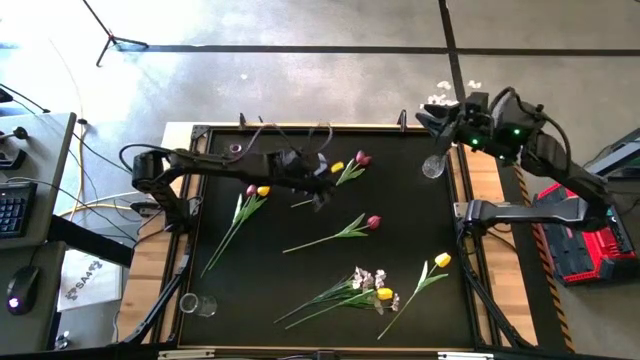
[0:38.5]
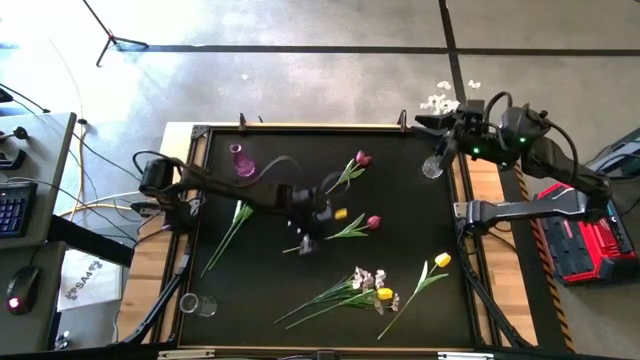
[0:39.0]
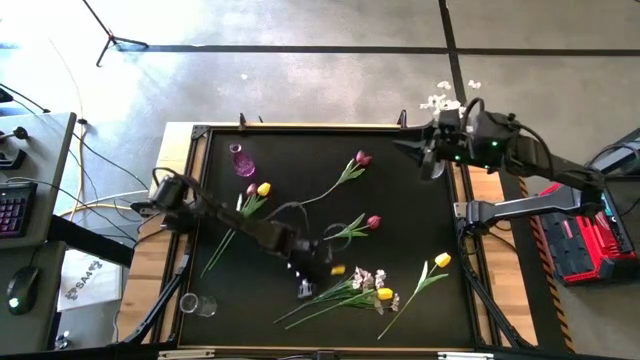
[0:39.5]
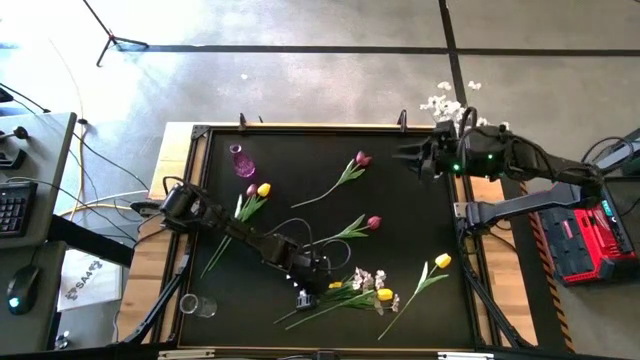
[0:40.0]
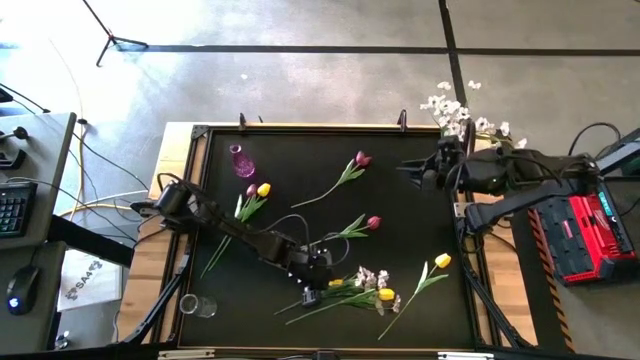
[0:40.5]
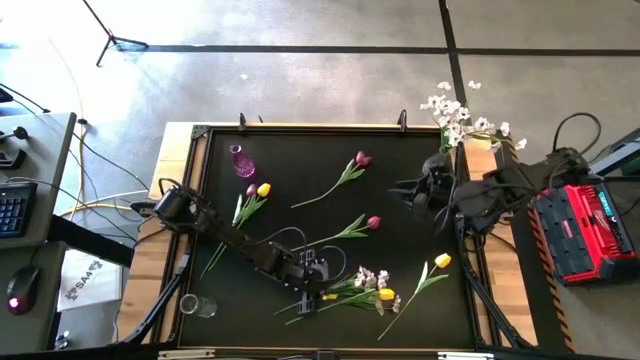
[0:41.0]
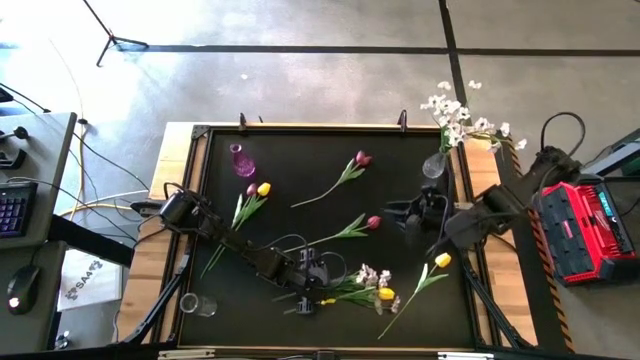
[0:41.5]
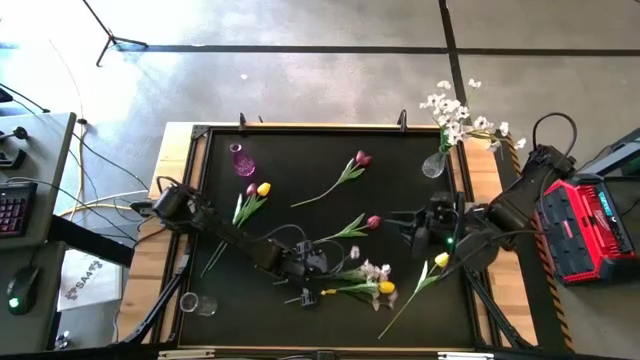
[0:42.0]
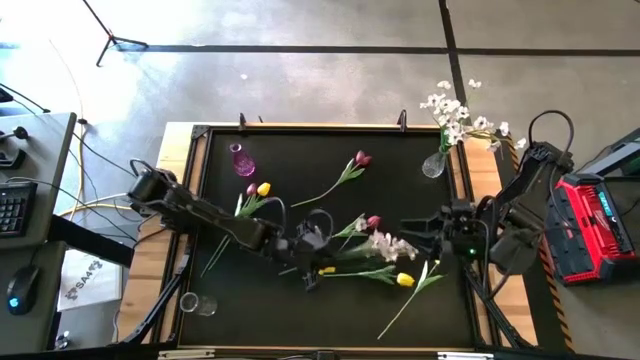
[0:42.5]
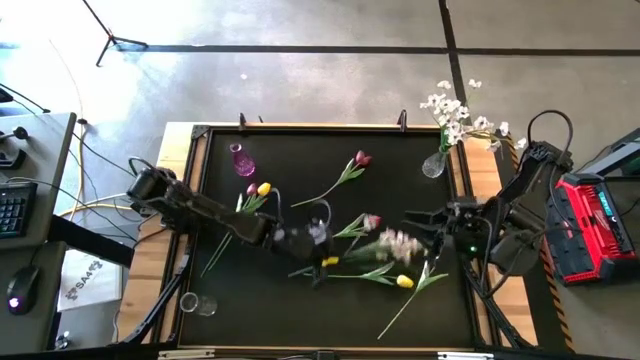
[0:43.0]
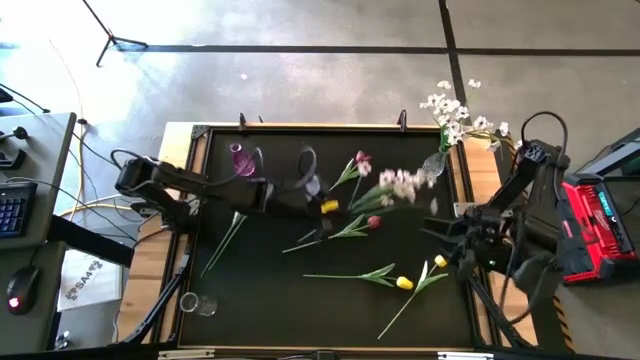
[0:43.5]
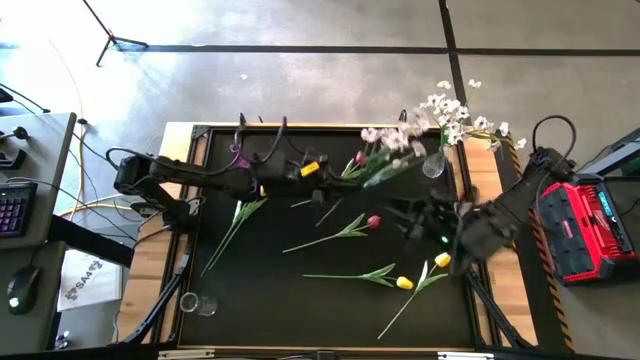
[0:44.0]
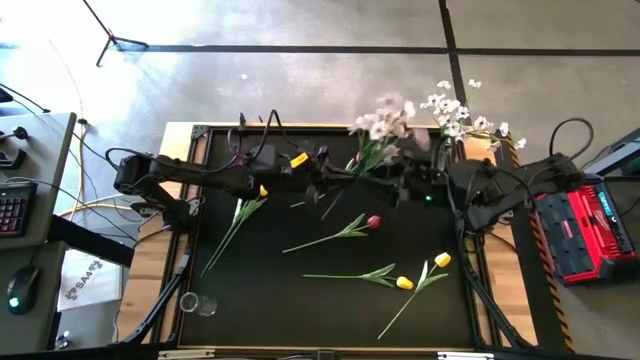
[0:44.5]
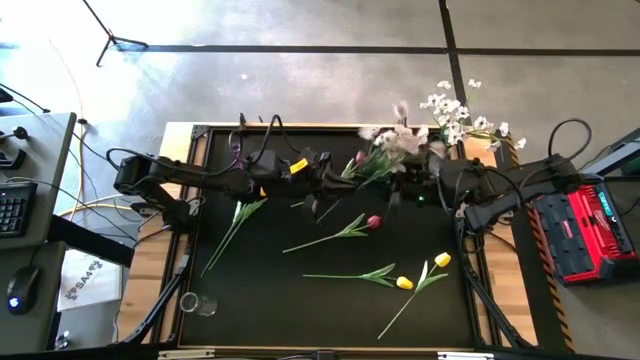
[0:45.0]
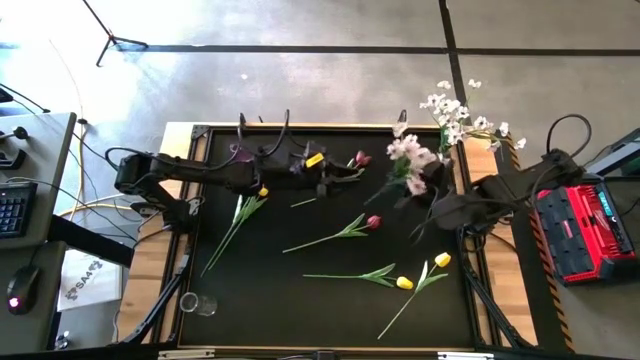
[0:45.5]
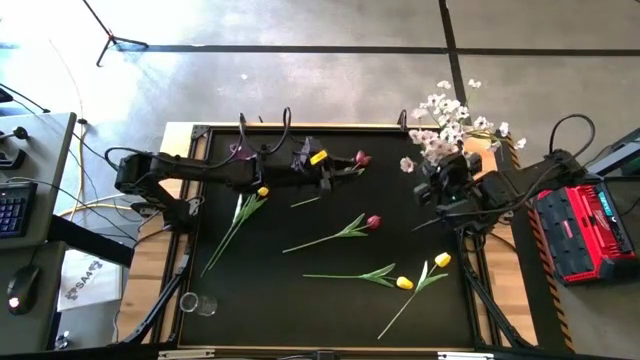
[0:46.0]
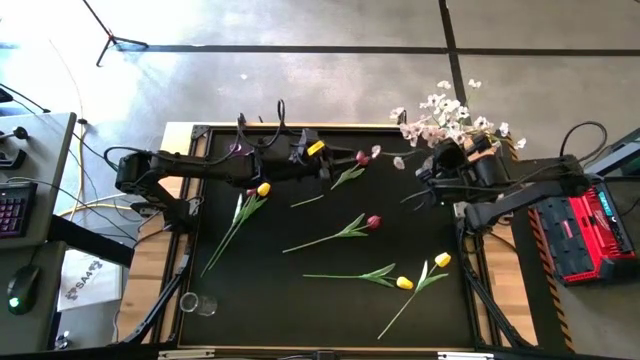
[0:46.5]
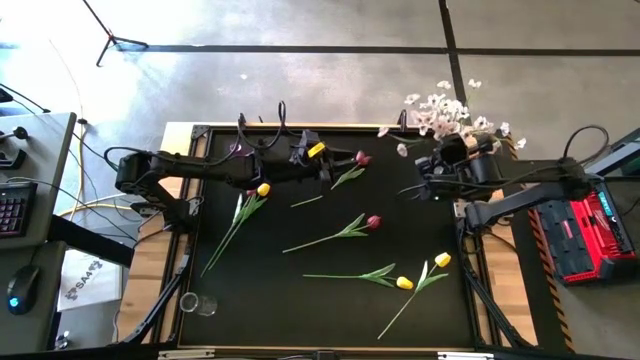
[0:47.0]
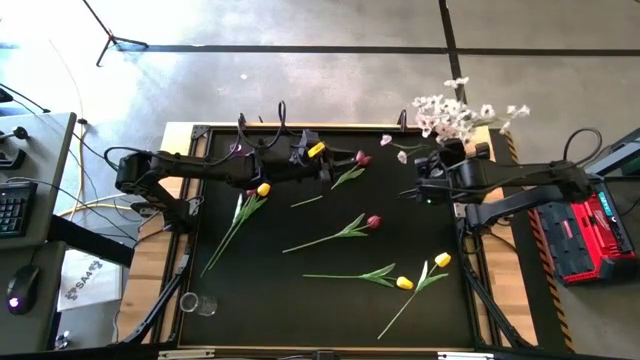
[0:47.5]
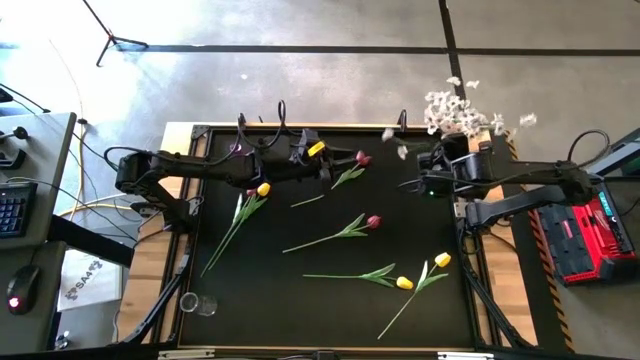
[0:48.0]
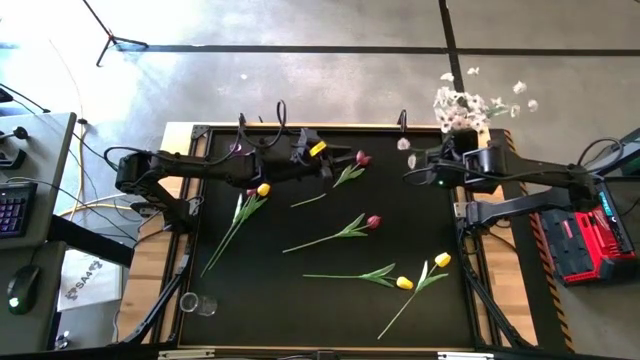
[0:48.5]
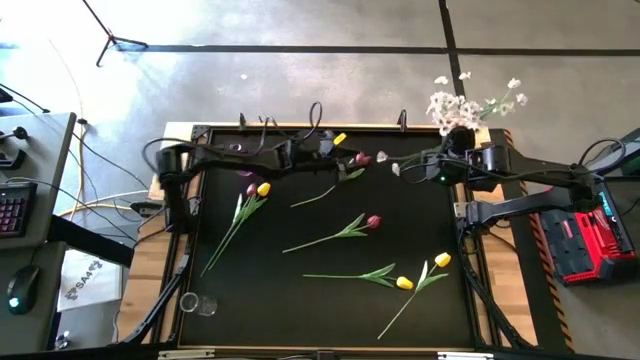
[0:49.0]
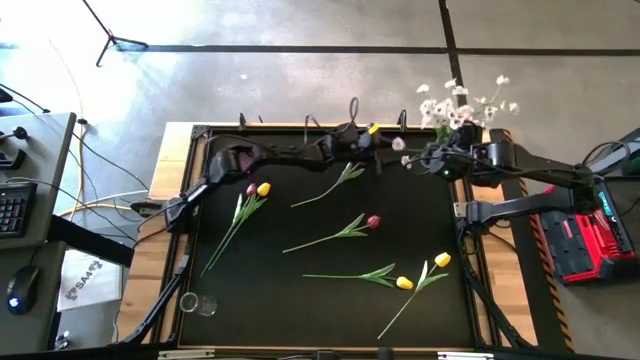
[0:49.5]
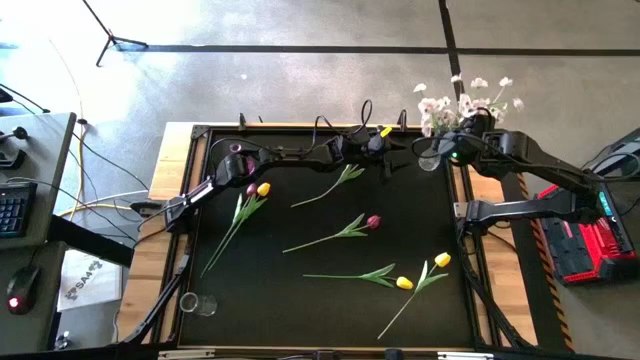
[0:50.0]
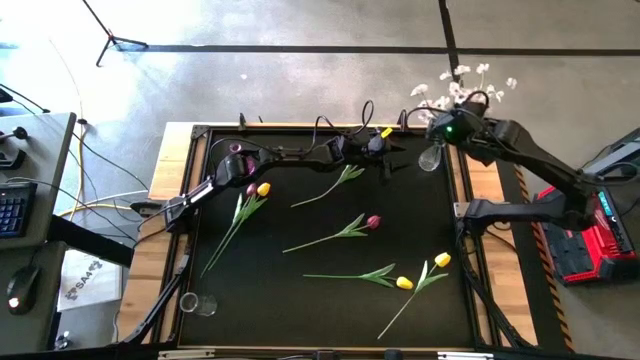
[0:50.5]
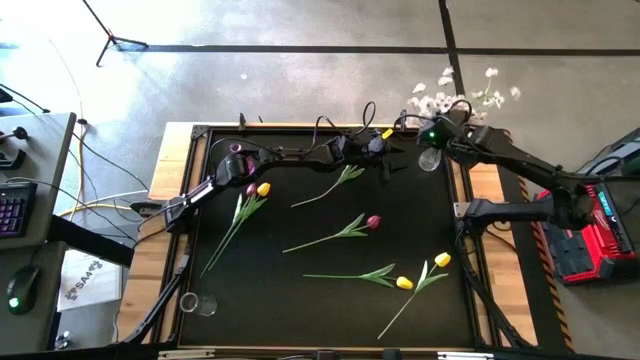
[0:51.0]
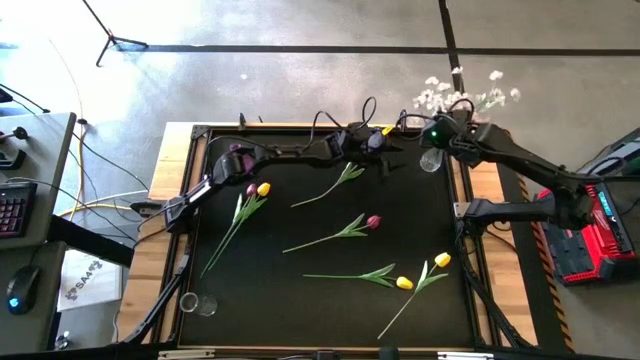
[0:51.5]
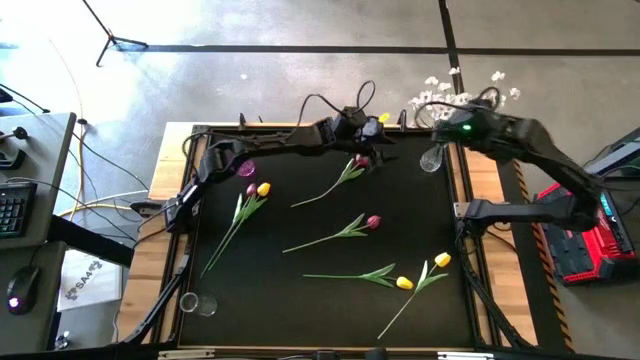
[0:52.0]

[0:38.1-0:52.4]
Task: Sort flowers into vase by color
Put the white flower into the top right transparent vase

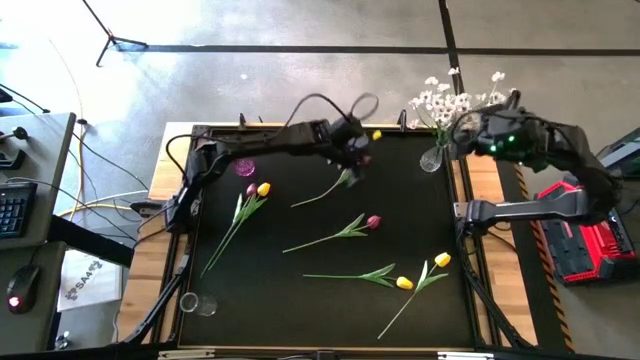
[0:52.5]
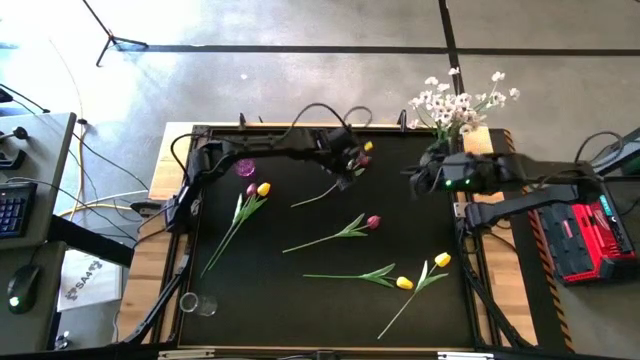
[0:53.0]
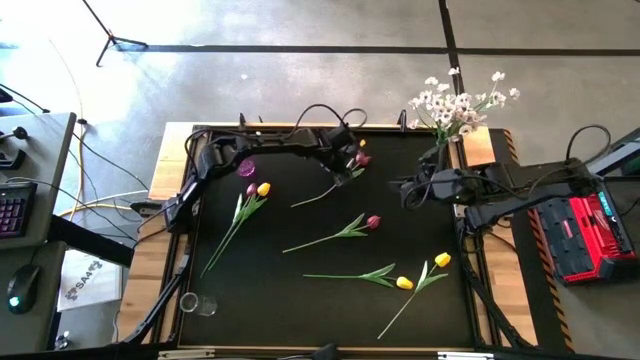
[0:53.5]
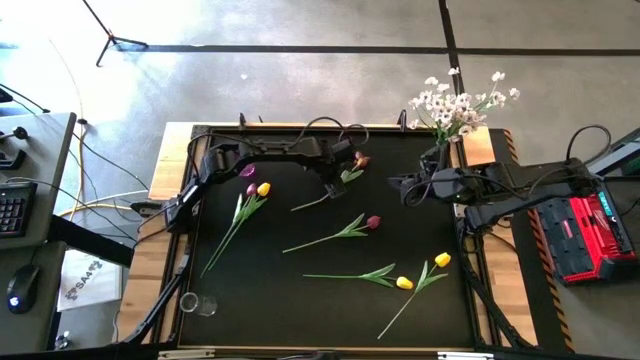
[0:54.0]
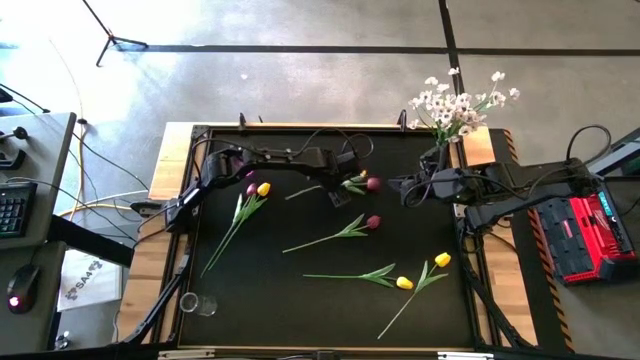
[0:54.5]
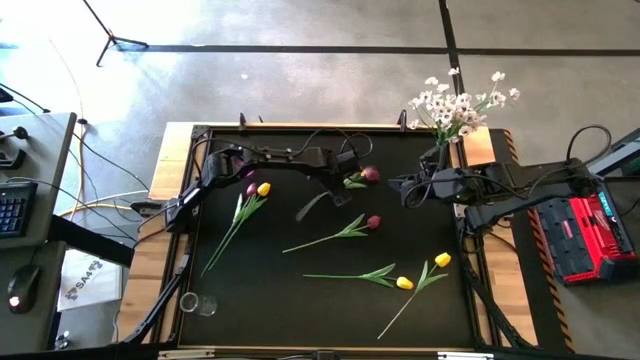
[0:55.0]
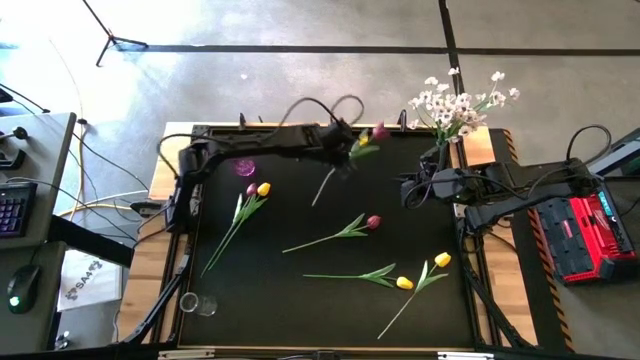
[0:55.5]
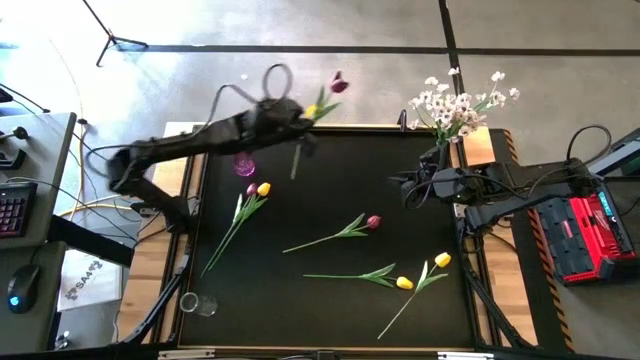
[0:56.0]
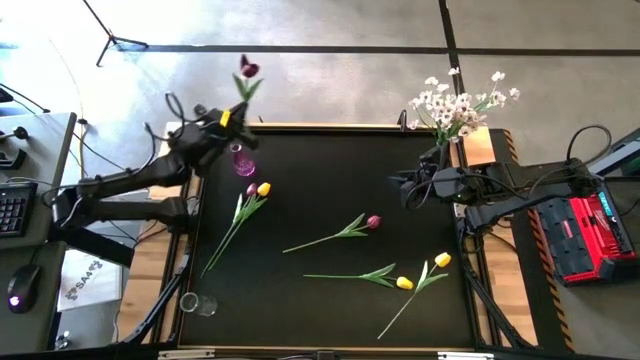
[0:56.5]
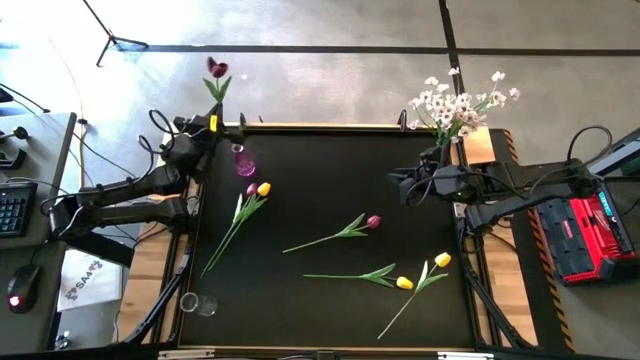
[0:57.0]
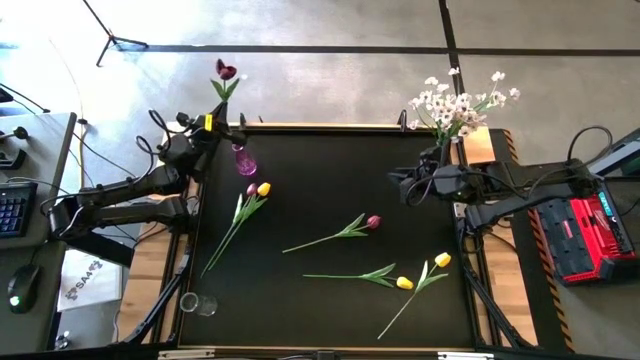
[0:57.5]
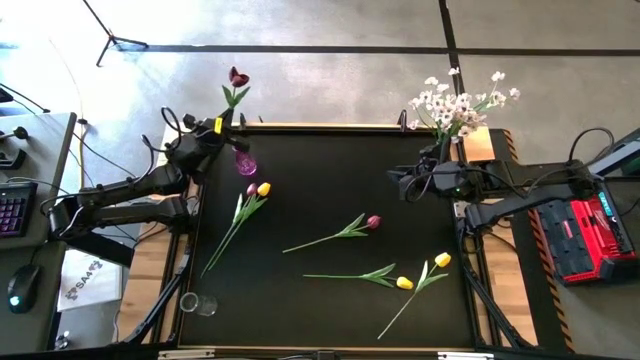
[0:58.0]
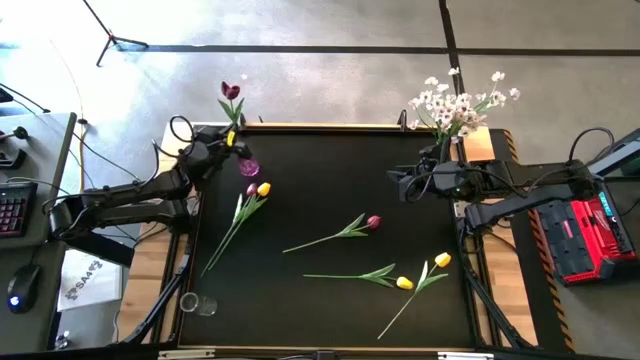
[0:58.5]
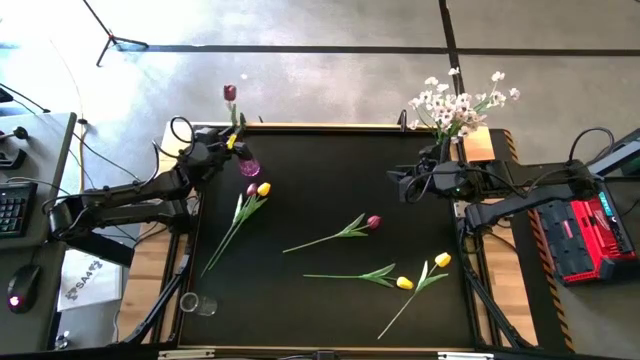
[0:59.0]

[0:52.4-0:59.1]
Put the top maroon tulip flower into the top left purple vase

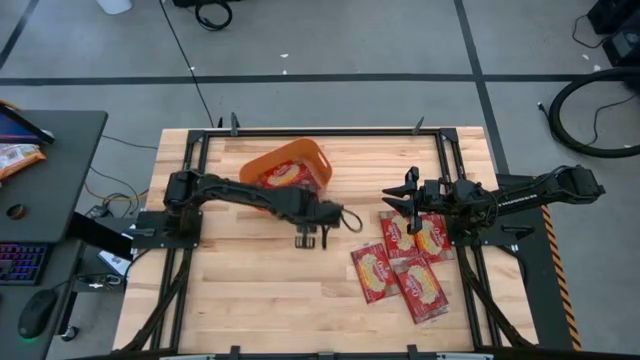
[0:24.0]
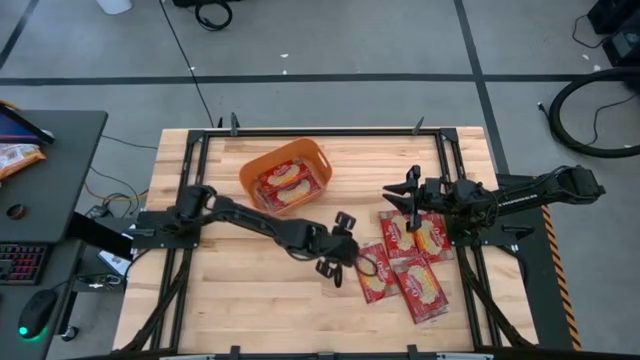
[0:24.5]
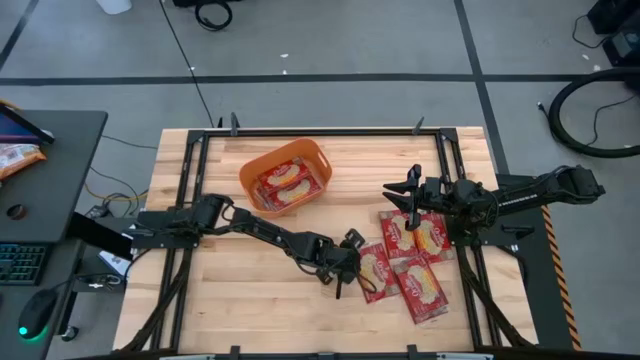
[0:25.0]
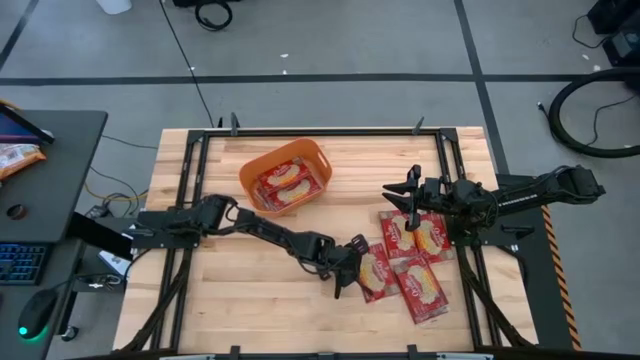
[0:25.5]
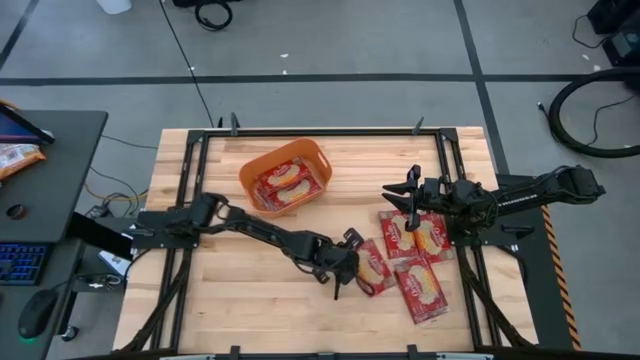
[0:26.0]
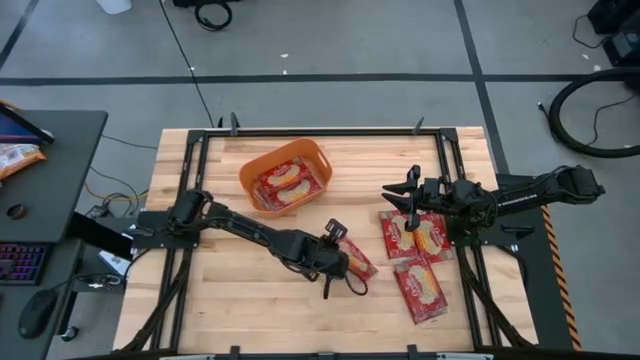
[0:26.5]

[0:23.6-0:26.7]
Task: Sort popcorn bags into baskets
Put the red popcorn bag into the orange bin
